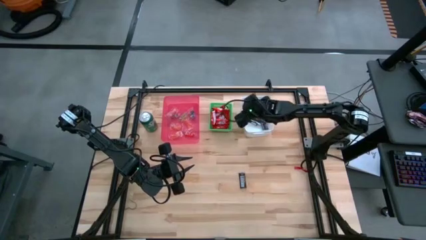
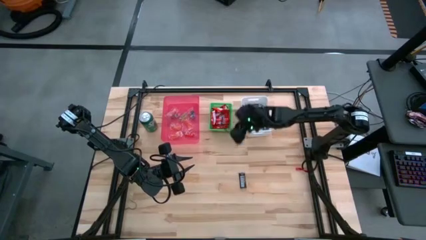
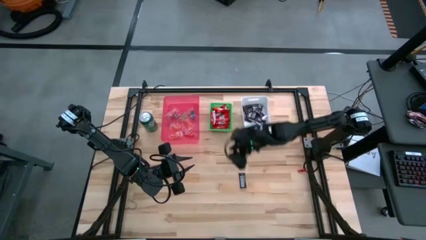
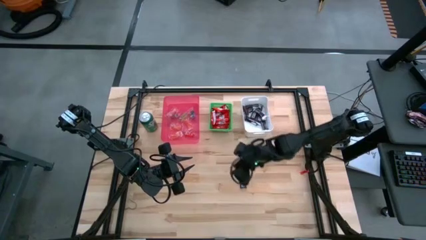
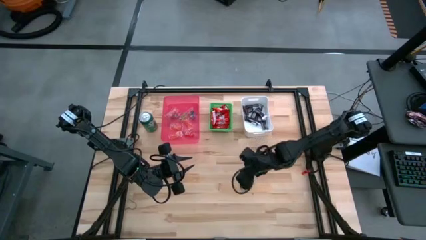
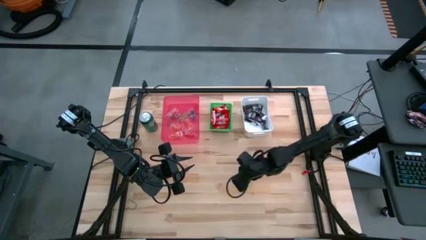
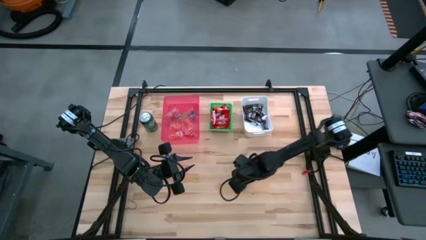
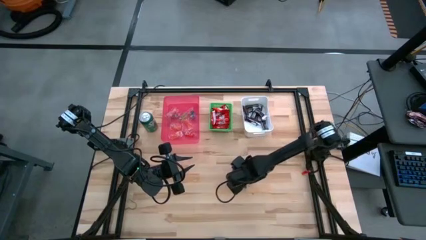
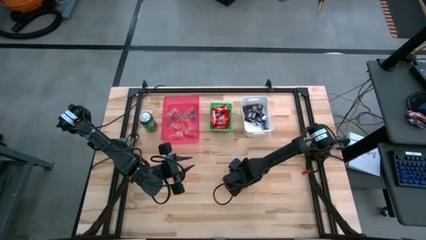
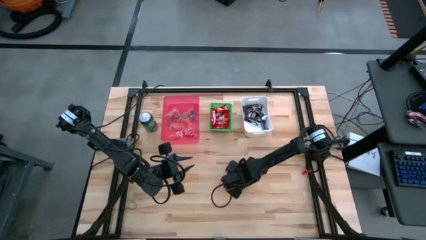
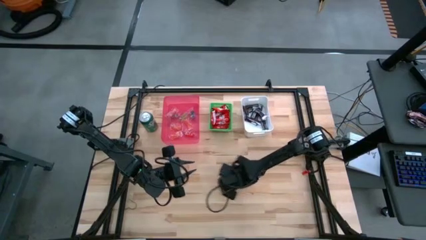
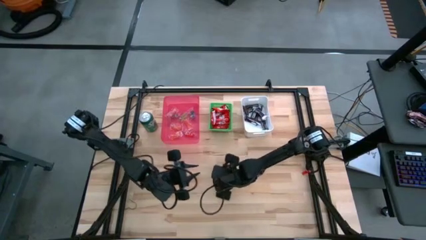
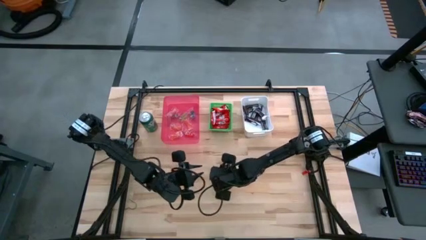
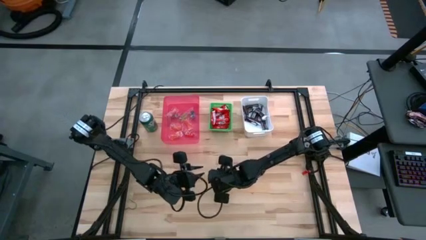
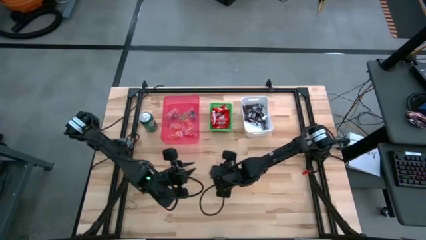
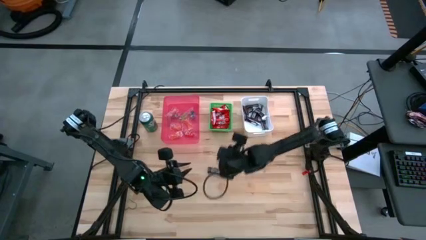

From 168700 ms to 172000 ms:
Task: Sort candy
Put the brown chocolate into the white bin

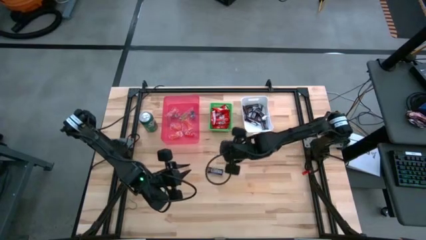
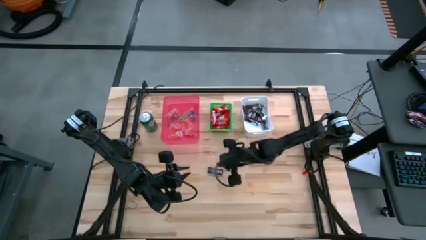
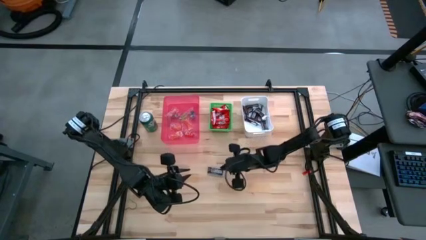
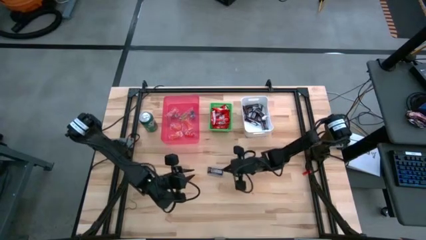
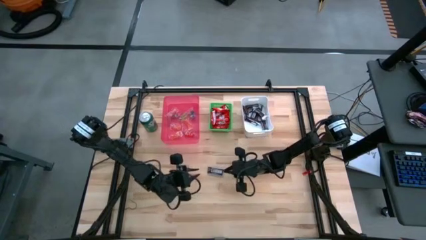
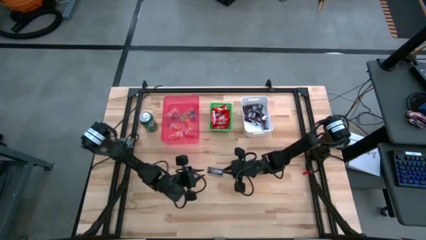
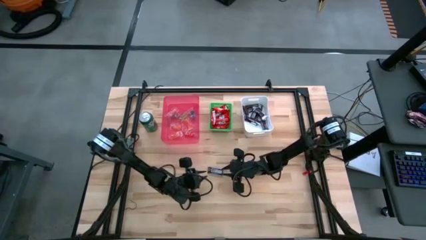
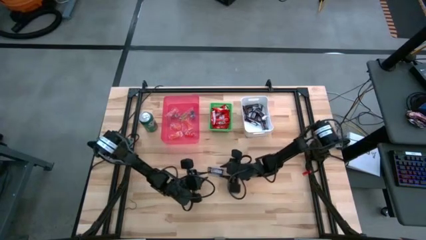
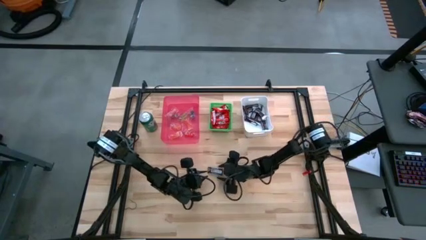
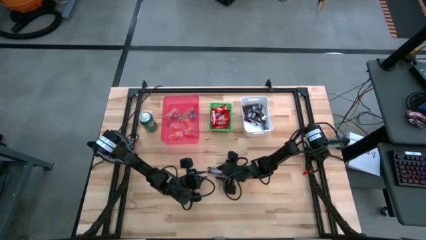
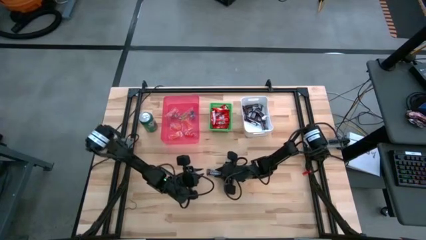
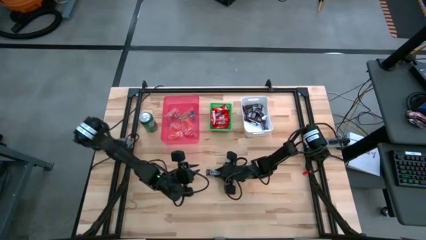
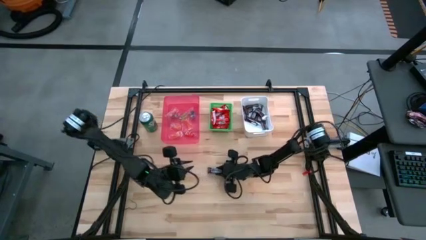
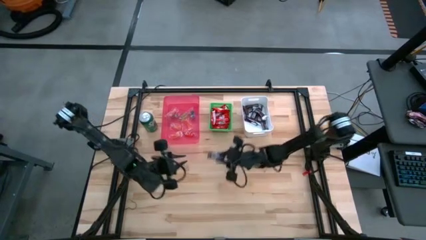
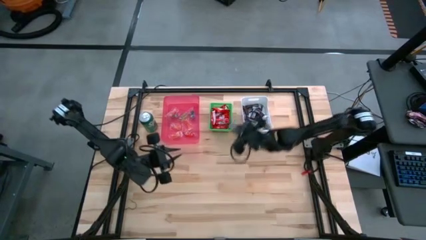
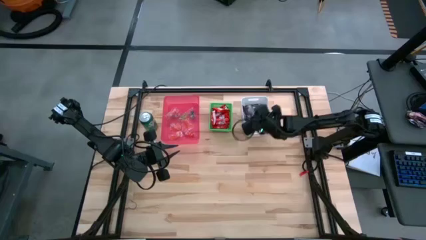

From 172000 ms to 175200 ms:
Put the brown chocolate into the white bin

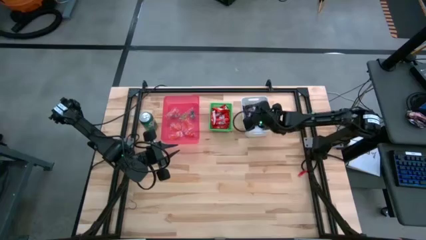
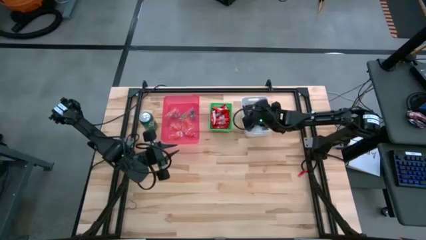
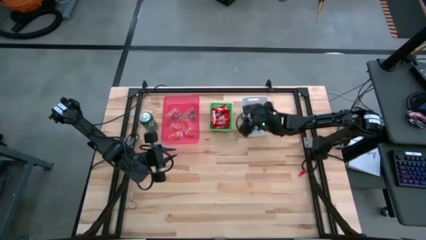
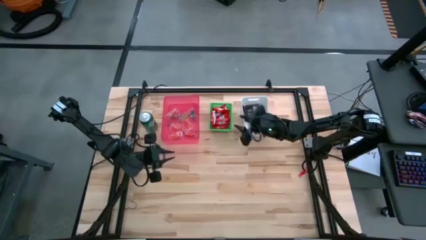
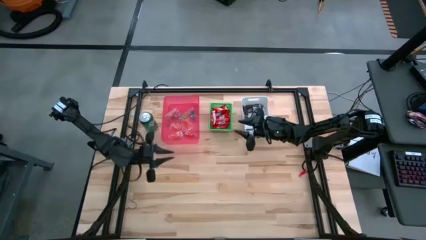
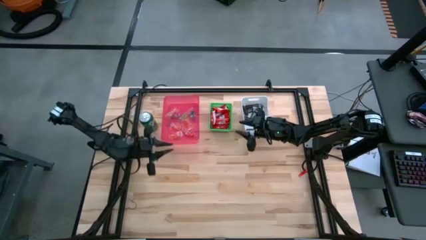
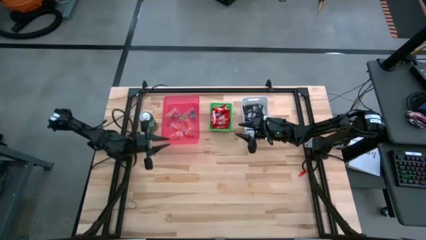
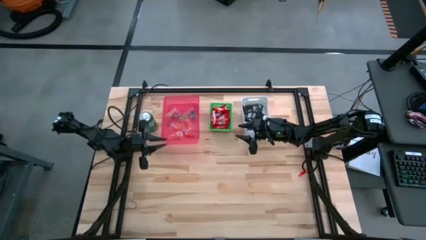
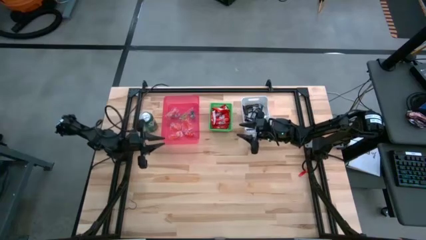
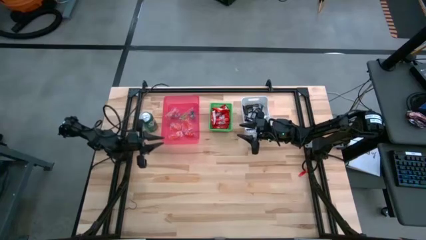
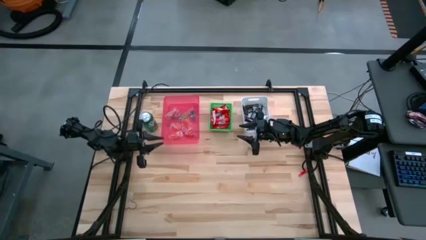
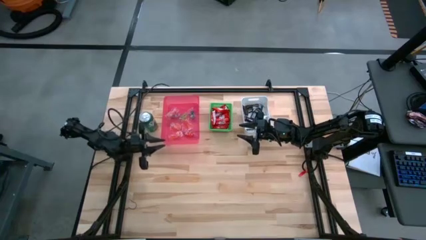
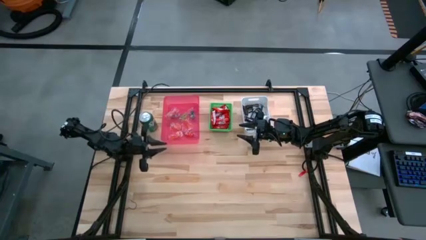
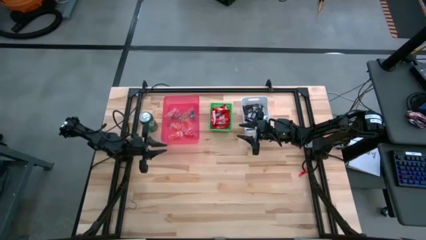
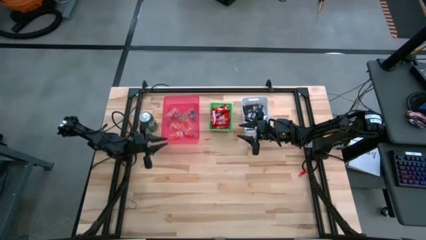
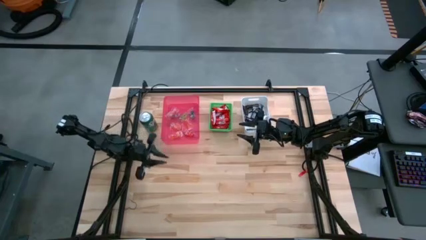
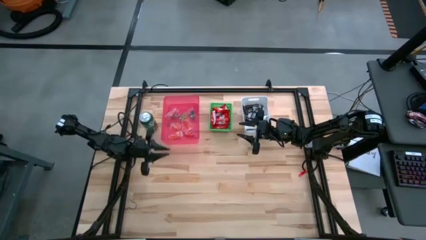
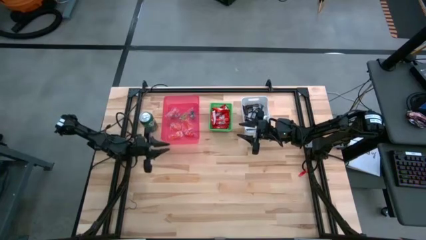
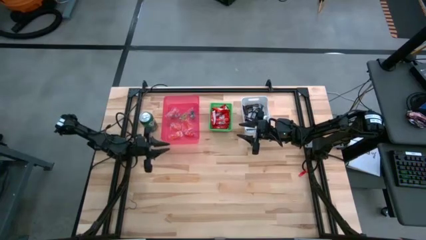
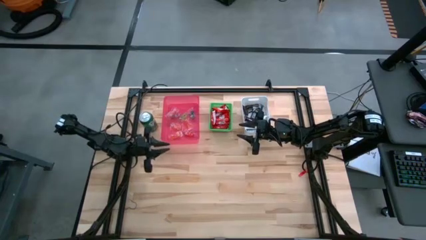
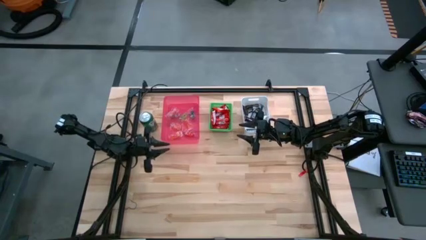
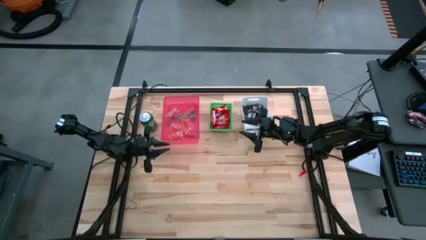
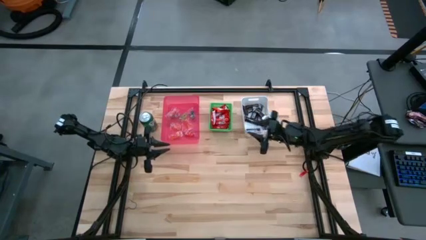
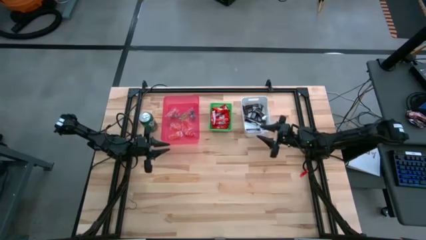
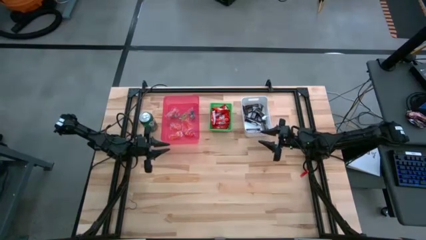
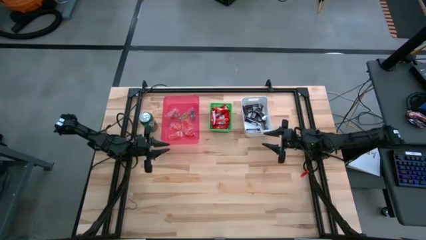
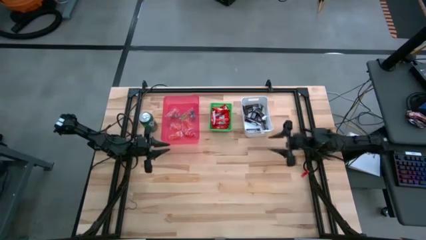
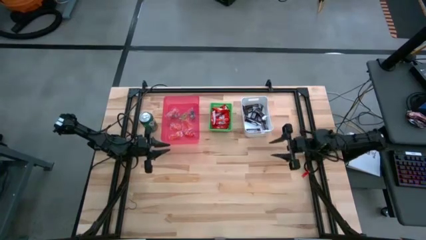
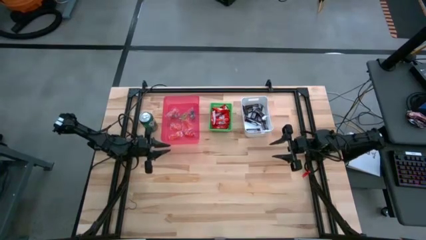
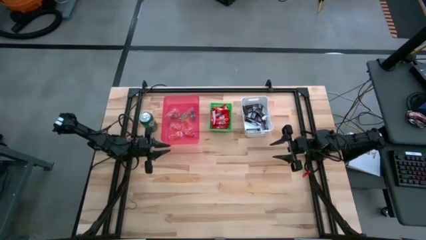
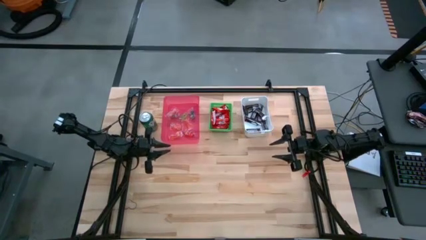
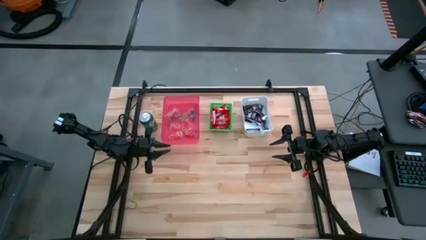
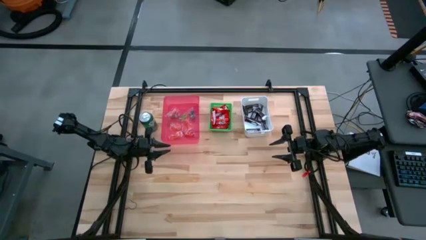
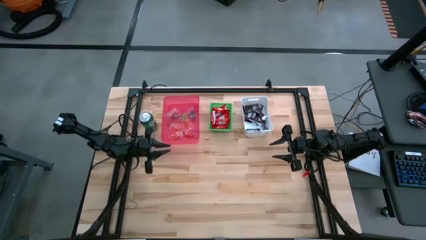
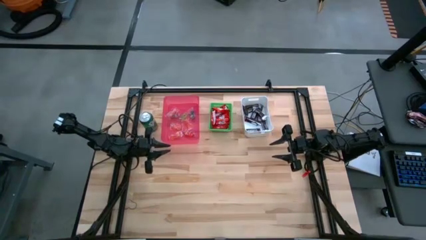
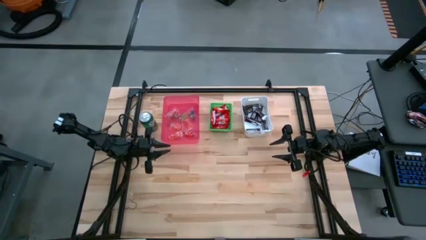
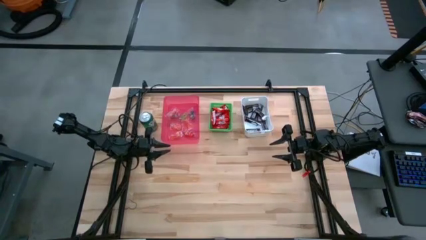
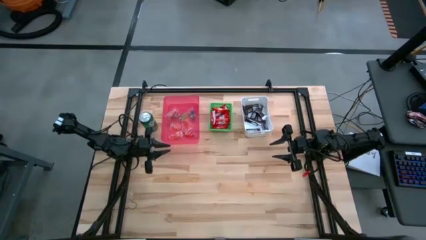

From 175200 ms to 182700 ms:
Return to Home Position
